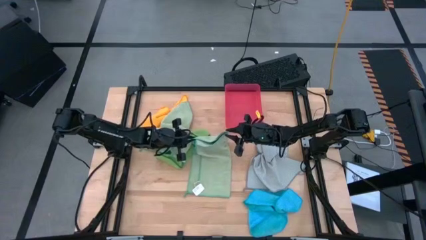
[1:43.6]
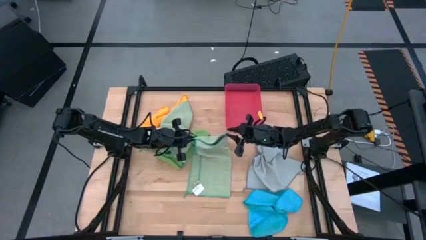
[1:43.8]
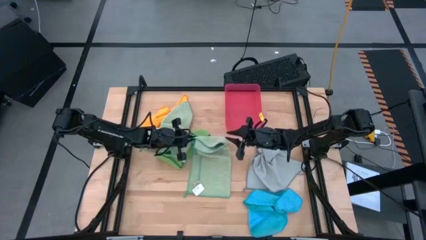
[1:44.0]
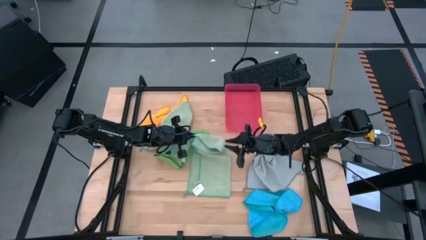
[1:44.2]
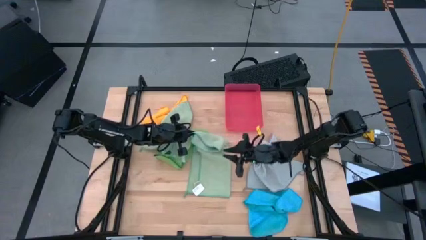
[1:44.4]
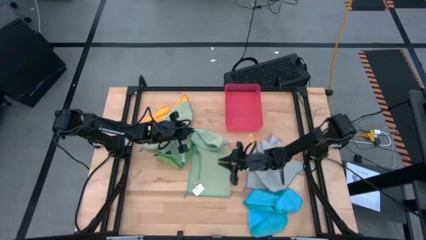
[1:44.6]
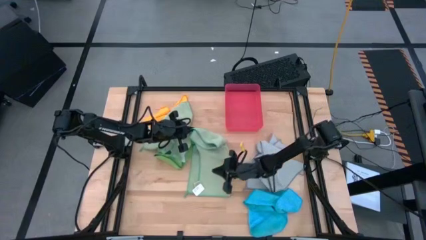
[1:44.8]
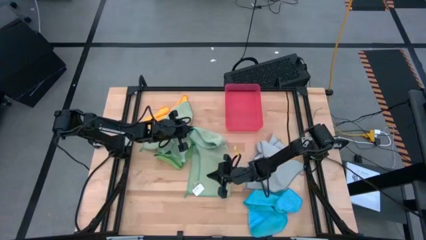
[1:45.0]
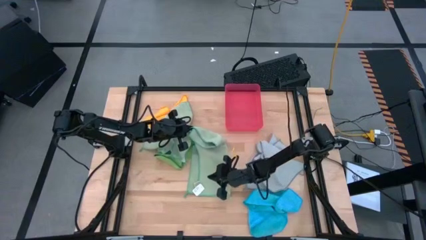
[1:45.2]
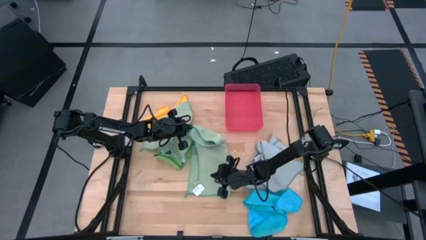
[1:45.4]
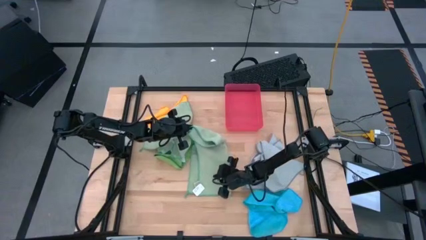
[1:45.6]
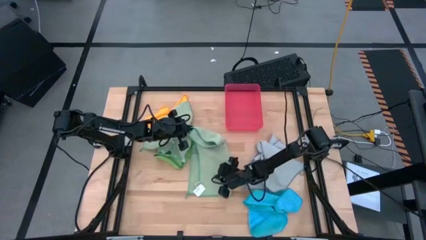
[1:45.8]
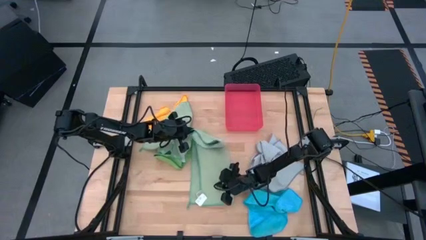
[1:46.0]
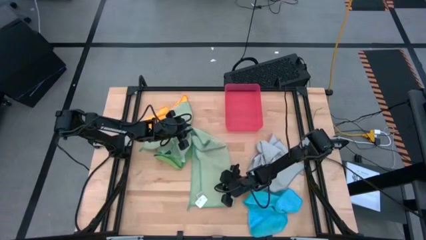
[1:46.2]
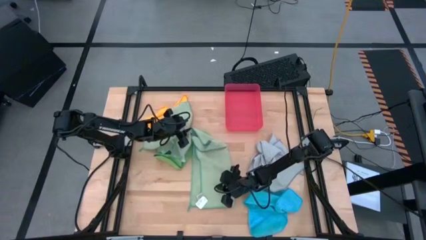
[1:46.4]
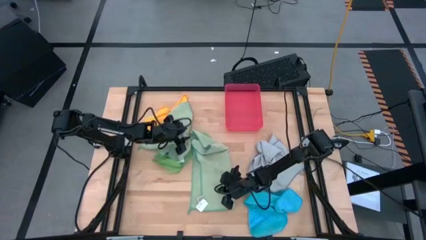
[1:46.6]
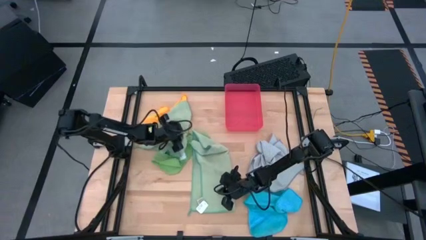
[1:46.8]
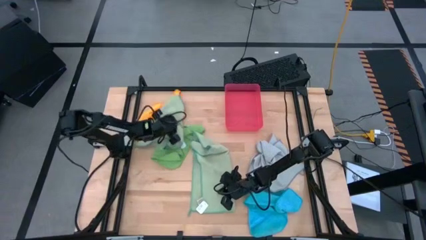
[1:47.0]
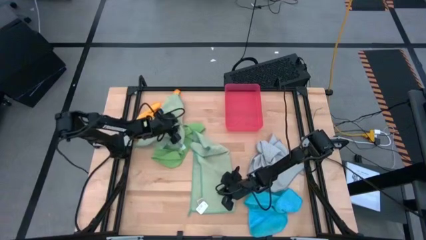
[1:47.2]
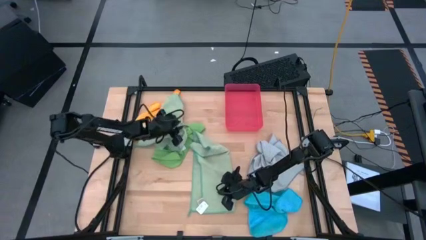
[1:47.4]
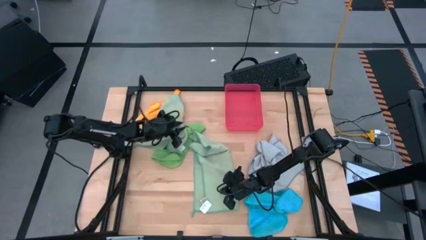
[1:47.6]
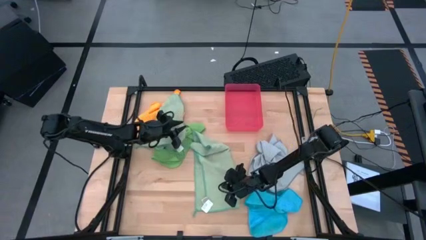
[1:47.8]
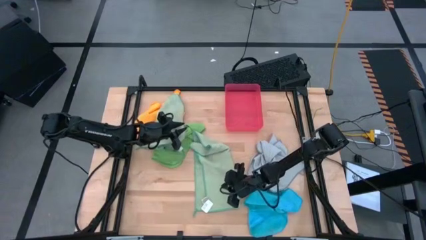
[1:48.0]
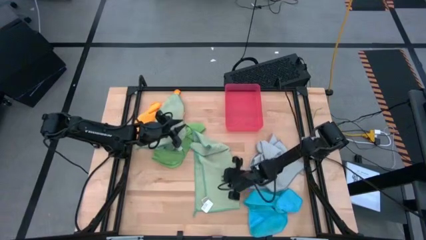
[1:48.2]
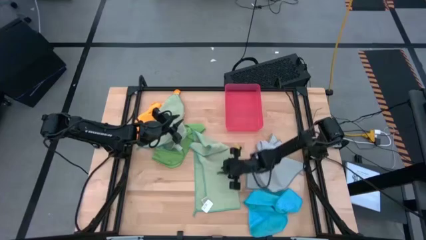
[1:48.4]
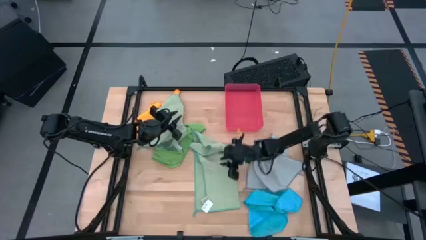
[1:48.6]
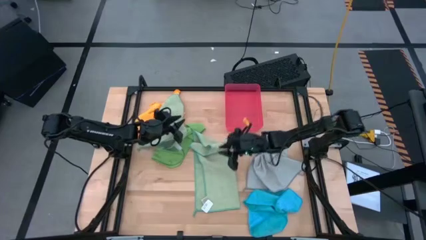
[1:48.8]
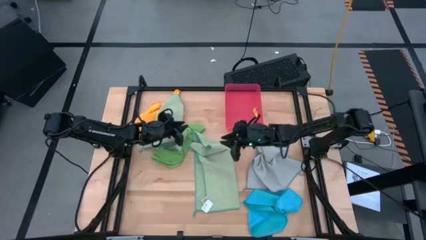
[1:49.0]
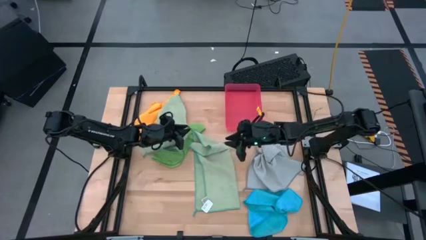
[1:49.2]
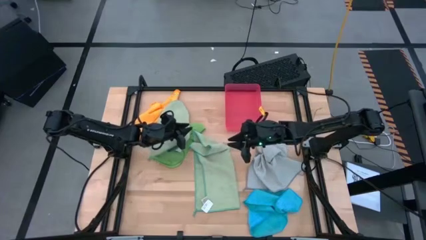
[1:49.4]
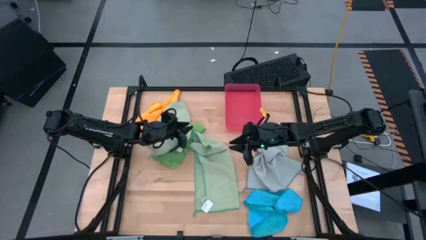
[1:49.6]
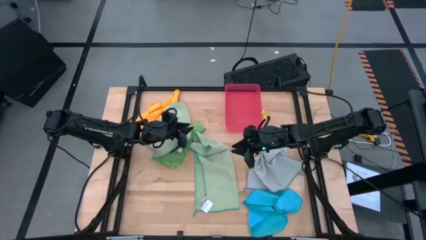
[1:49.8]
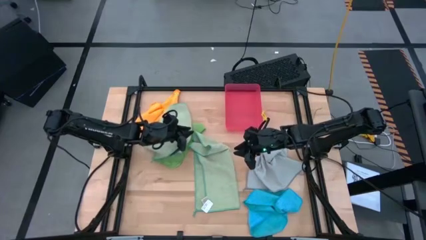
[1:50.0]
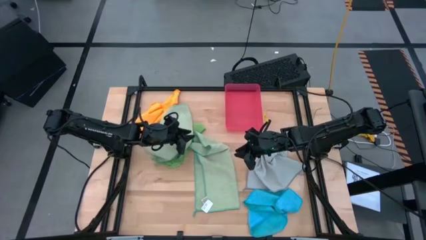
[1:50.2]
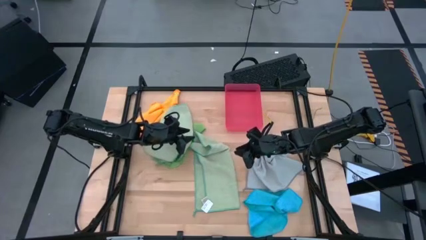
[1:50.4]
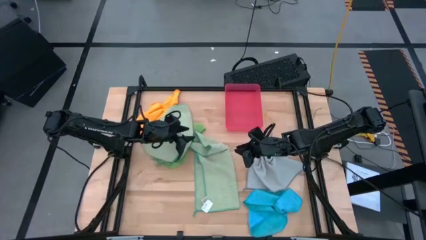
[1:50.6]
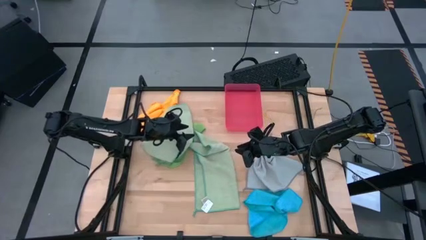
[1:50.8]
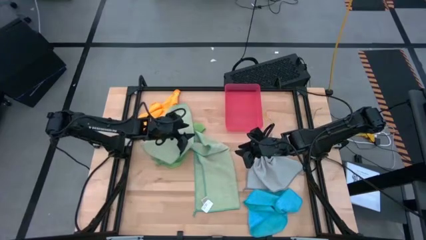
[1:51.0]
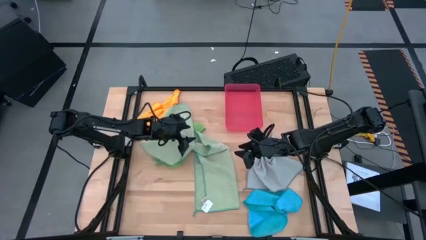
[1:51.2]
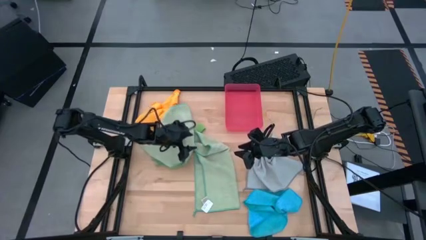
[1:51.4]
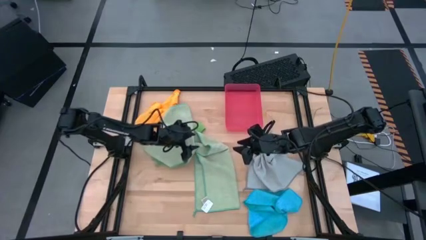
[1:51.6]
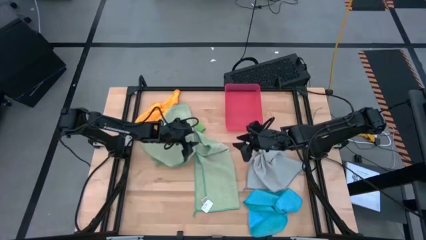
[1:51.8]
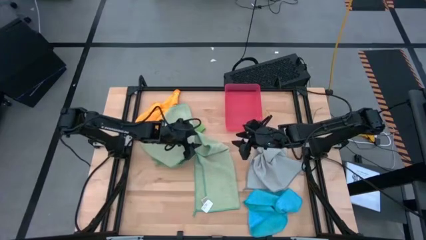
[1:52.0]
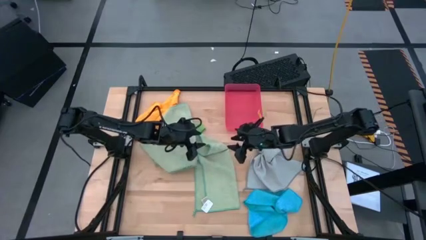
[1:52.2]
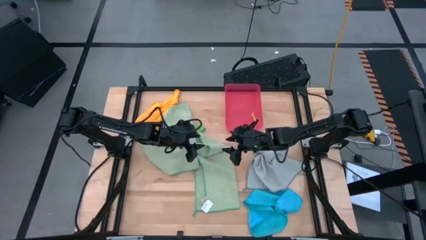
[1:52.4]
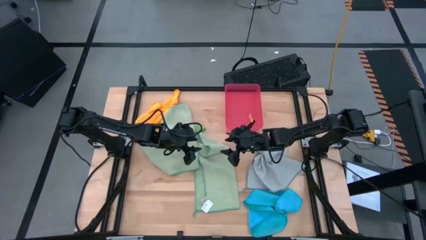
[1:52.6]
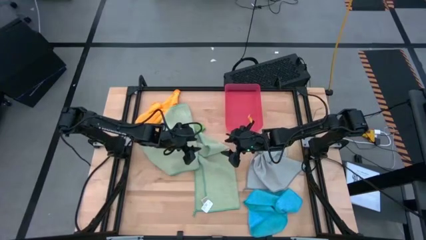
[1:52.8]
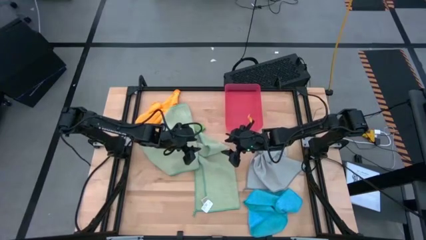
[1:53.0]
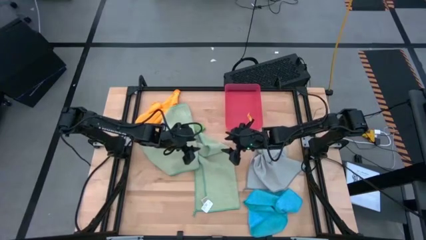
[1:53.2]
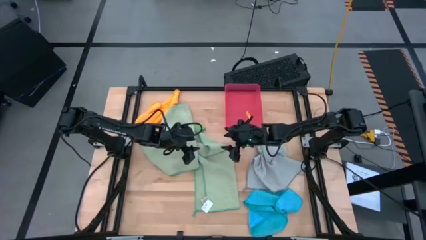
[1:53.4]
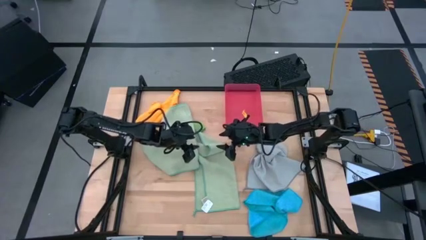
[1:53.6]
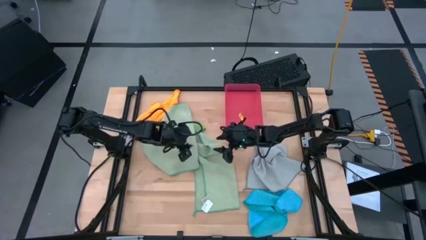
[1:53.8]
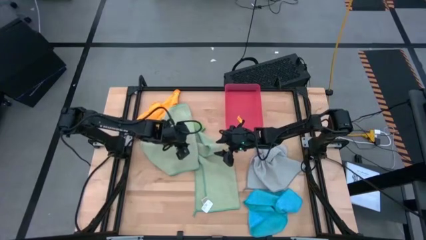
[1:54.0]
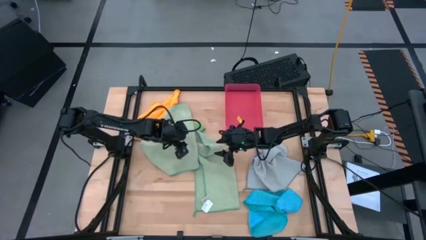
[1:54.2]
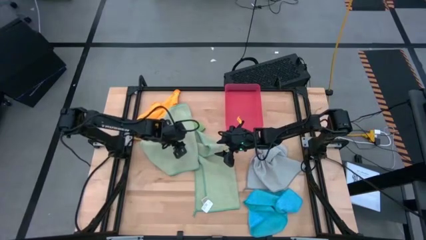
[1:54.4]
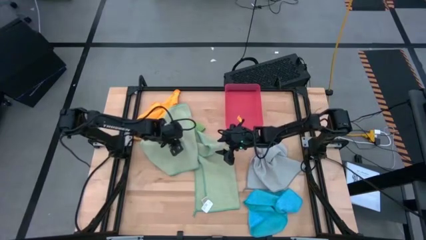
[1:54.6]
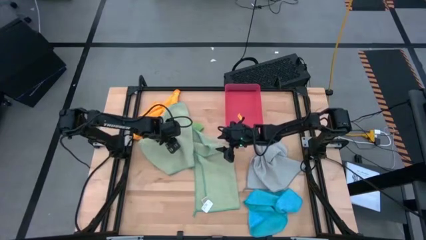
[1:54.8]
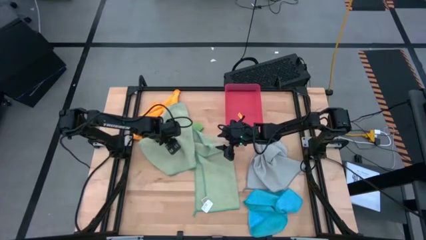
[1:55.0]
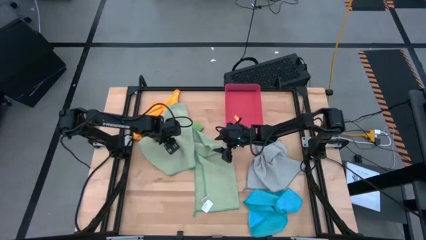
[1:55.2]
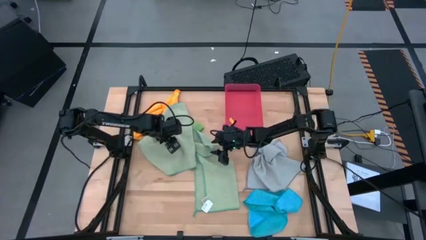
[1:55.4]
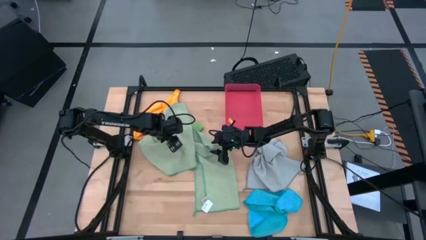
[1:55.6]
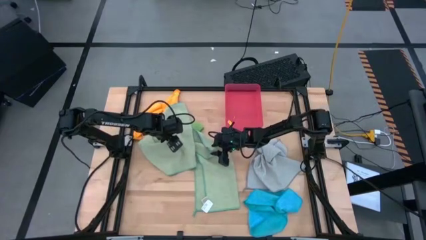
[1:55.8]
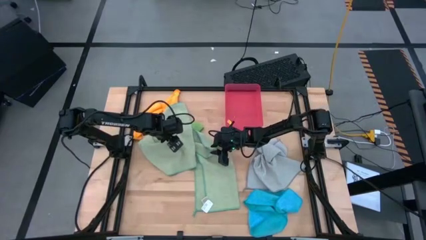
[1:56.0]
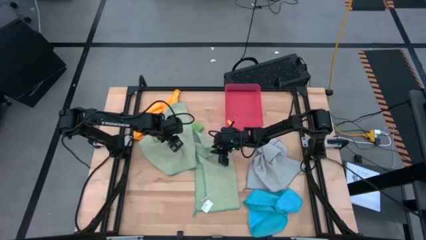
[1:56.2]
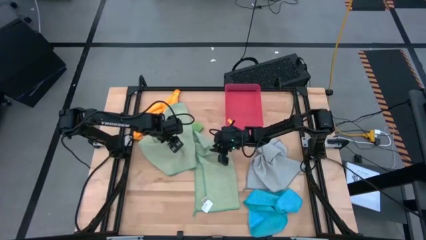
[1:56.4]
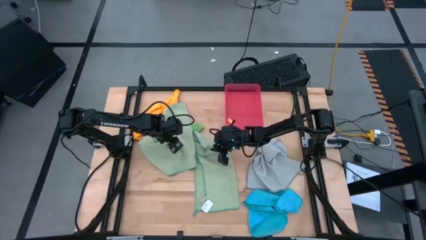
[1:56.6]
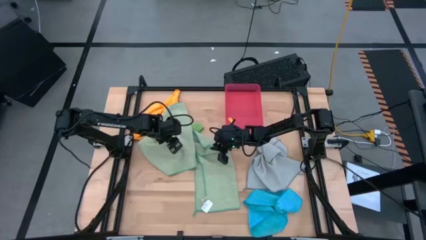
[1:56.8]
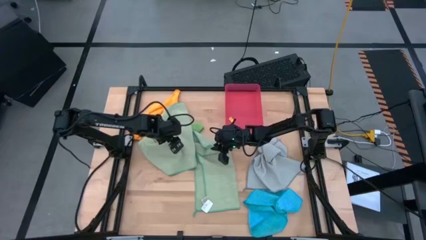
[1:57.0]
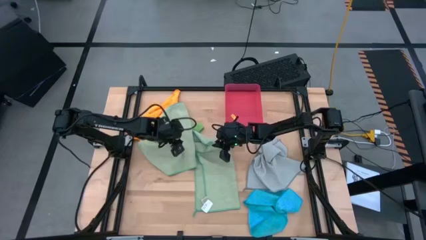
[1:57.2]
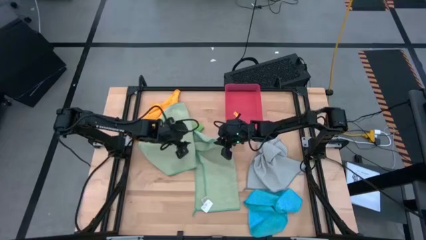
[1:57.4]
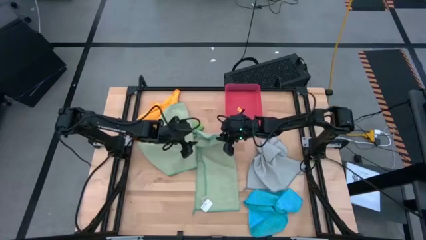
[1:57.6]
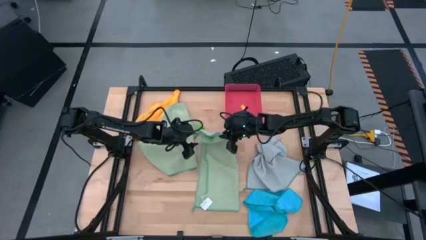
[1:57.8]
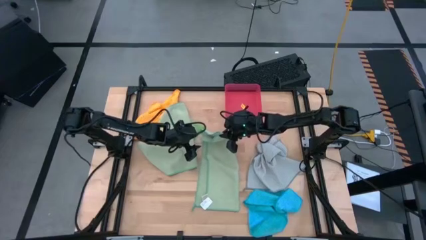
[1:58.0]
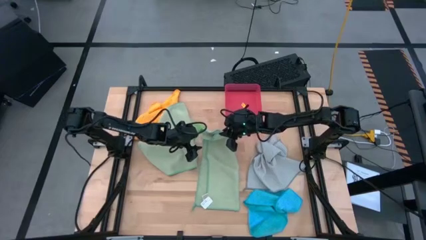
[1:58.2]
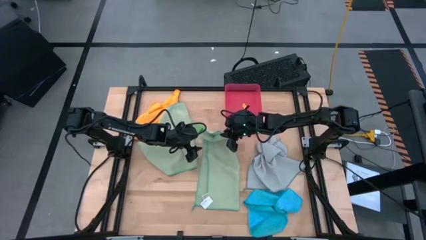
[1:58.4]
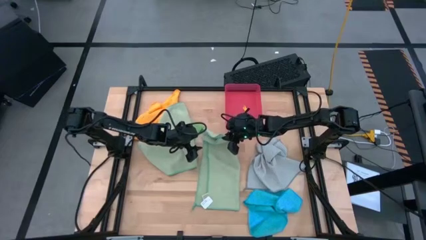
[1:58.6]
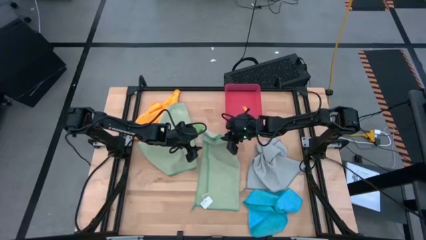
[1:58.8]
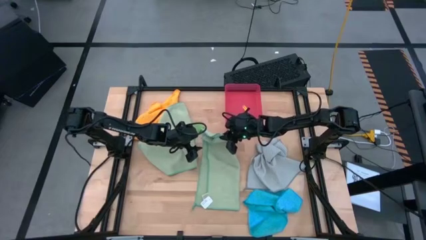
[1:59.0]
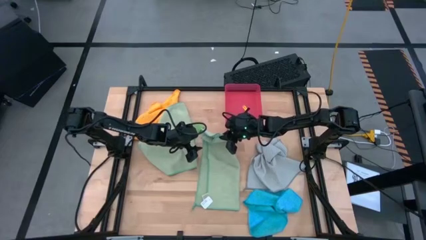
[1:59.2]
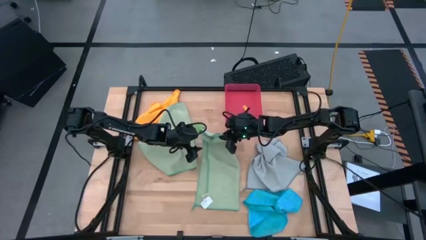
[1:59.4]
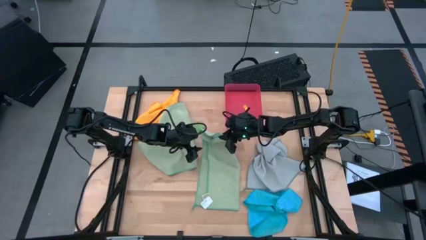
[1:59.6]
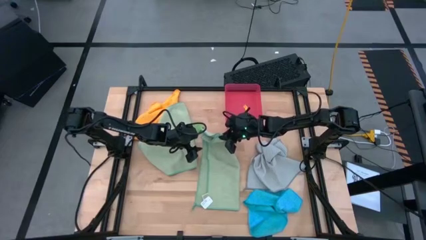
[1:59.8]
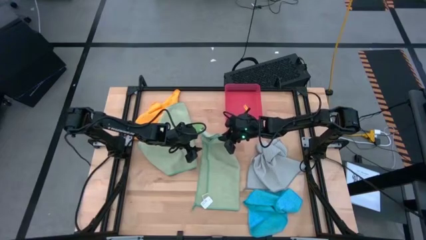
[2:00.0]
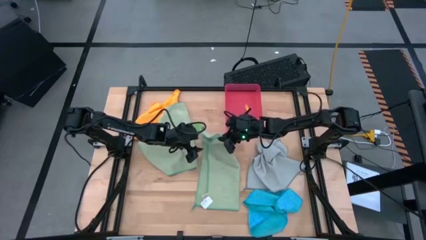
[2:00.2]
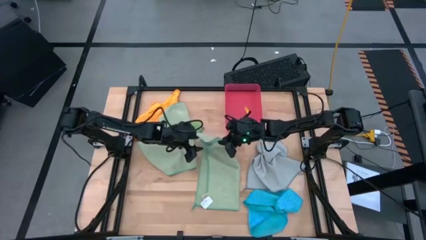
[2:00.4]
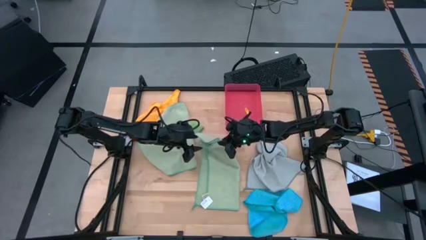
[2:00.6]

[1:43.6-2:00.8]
Task: Fold microfiber towels
Fold the right light green microfiber cloth
